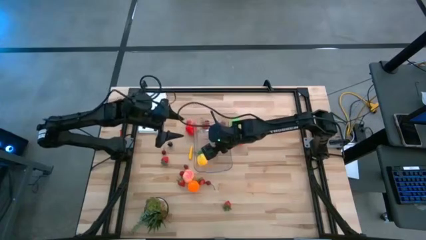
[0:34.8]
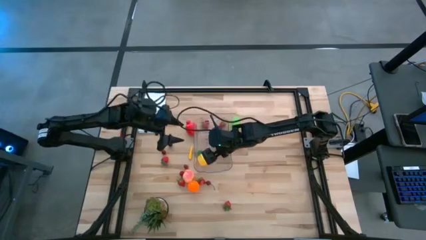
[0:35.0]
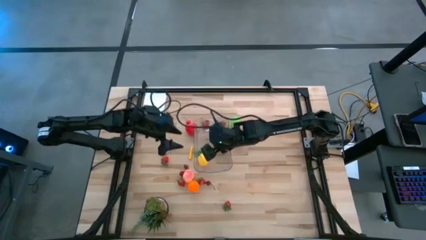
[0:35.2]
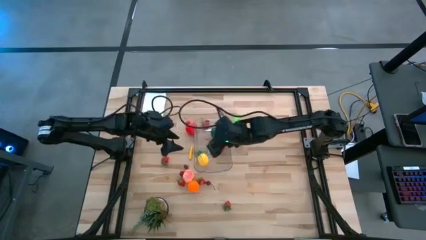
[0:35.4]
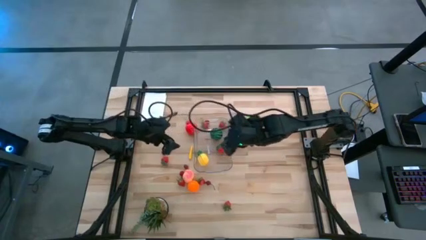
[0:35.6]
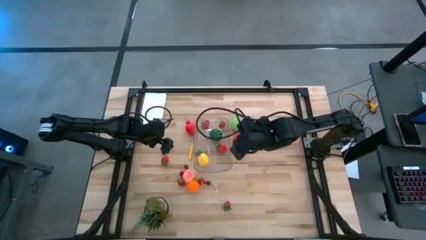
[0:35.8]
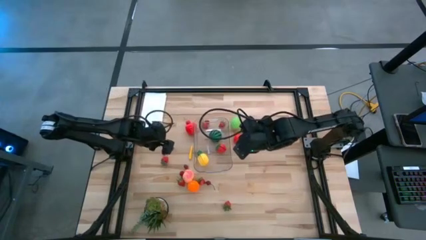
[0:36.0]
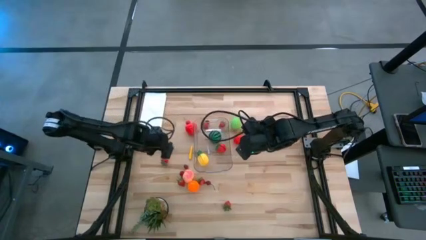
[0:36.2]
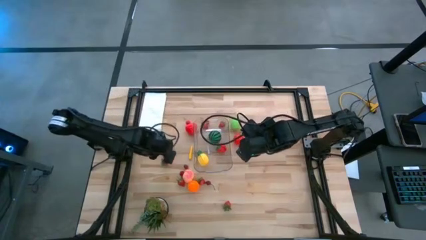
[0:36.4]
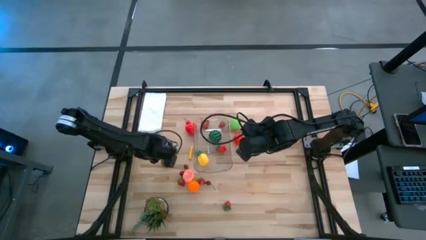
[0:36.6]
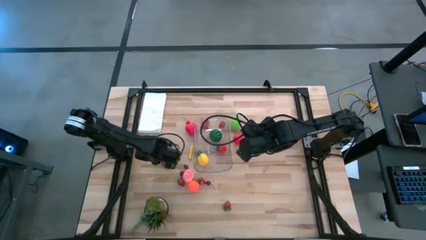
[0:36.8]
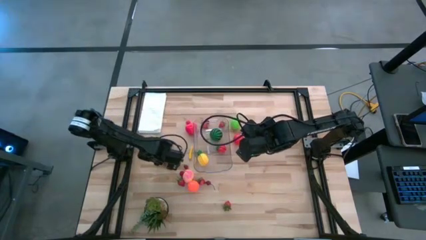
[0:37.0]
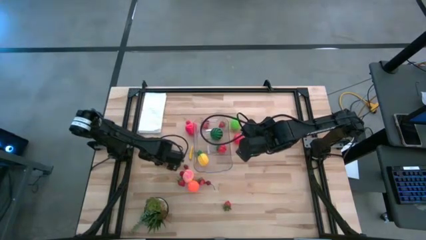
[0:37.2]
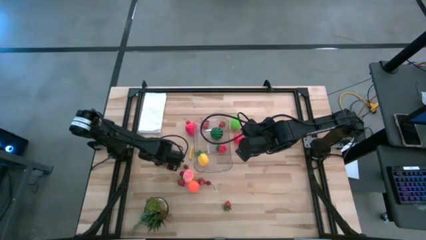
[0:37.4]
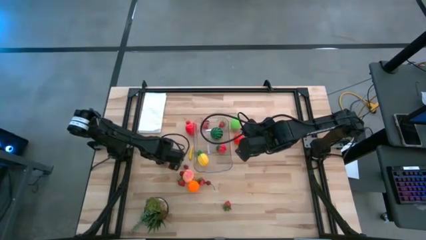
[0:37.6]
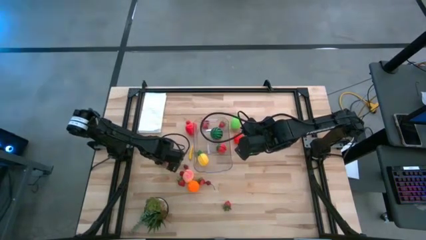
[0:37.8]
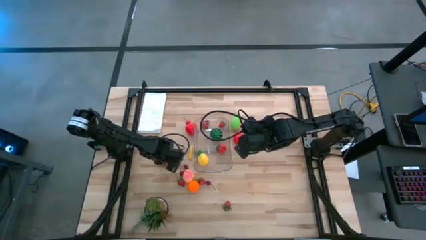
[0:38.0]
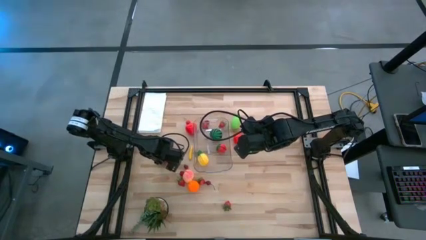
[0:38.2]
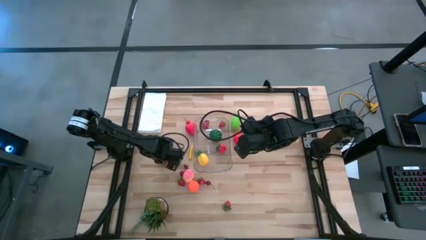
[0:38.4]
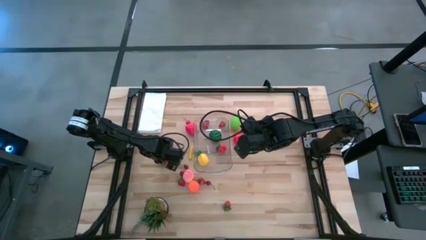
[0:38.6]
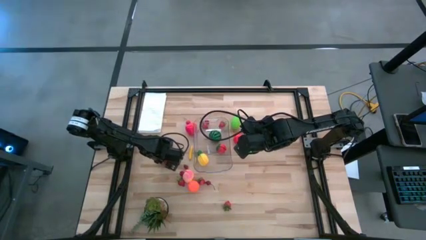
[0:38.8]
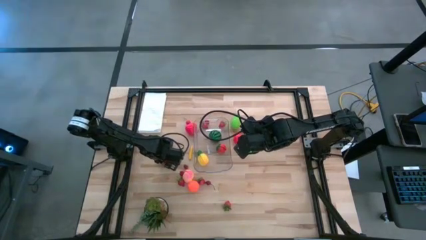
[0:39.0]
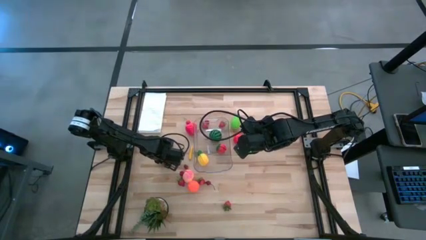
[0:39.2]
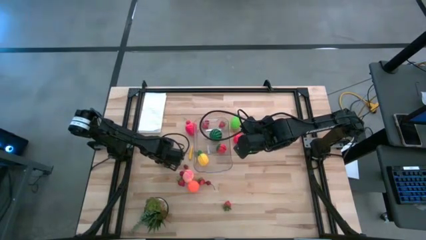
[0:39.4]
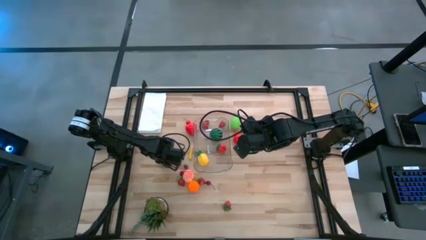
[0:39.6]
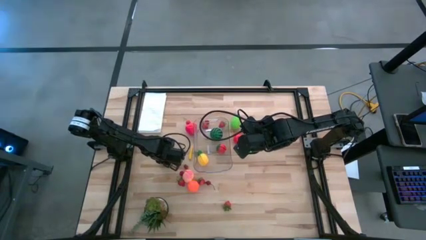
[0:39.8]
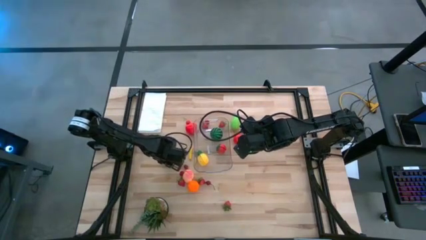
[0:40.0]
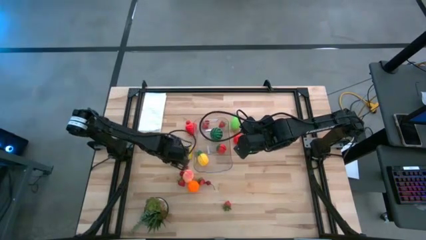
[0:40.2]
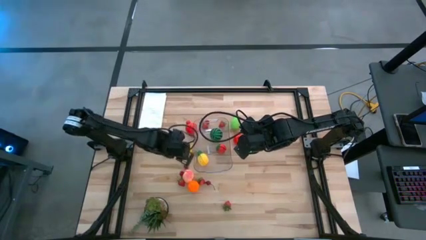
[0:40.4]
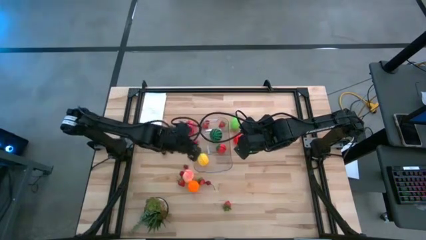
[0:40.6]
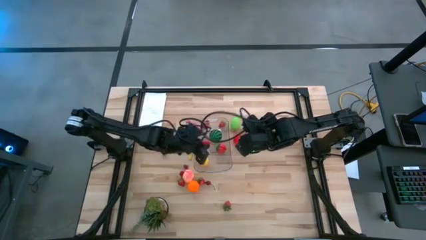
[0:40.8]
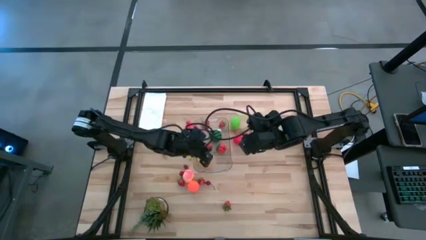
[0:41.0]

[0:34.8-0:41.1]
Task: Pick and placing Produce into tupperware
Put the strawberry into the transparent bin

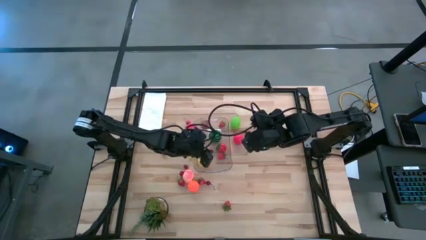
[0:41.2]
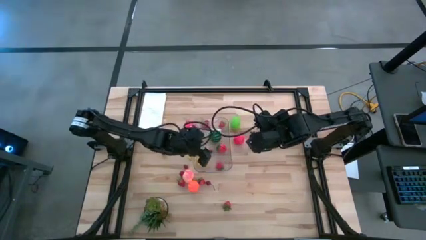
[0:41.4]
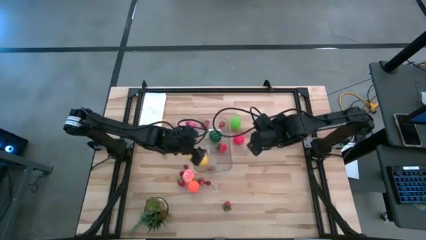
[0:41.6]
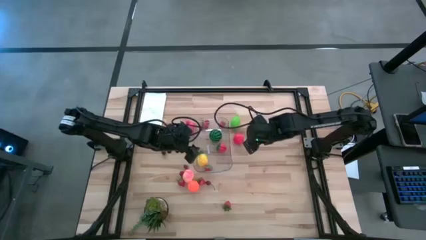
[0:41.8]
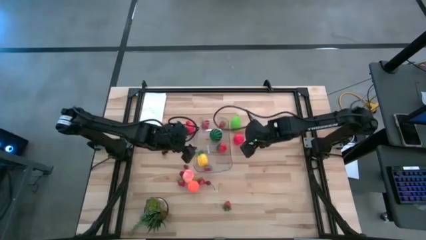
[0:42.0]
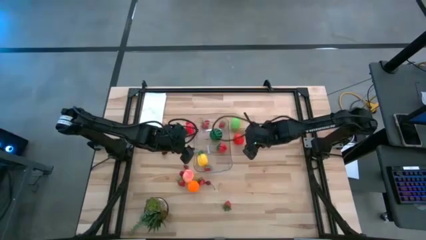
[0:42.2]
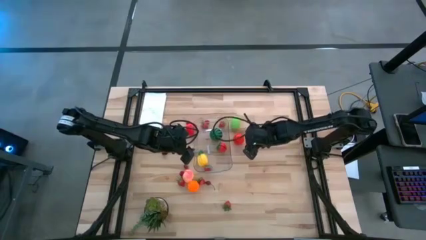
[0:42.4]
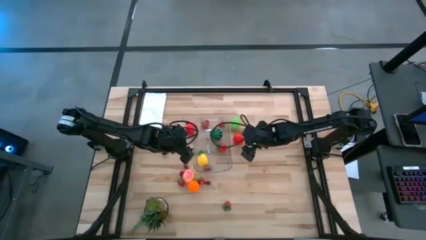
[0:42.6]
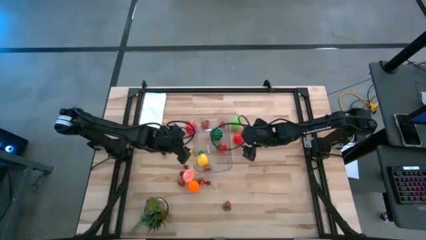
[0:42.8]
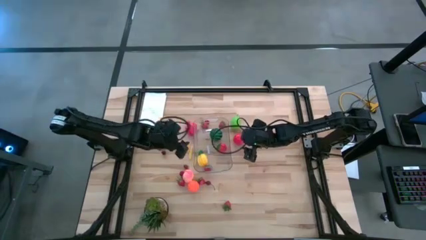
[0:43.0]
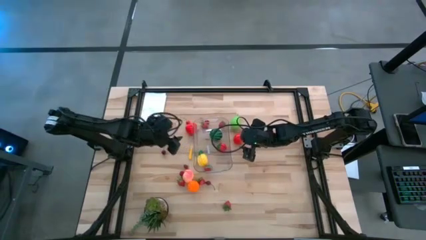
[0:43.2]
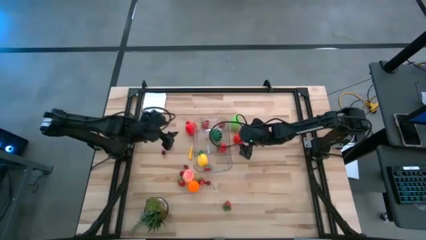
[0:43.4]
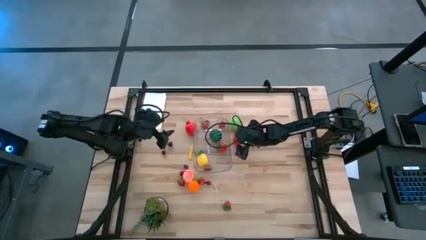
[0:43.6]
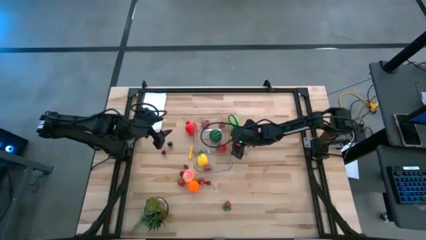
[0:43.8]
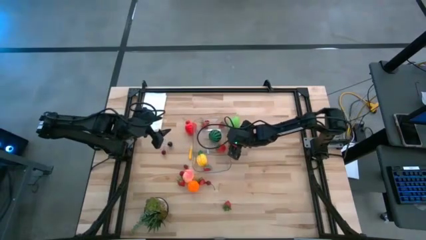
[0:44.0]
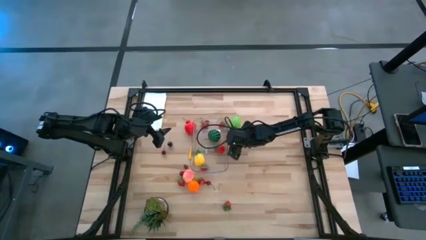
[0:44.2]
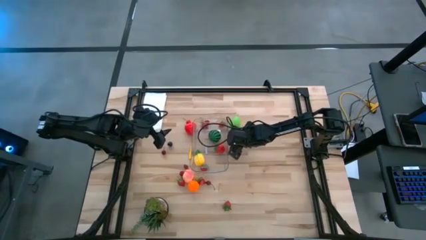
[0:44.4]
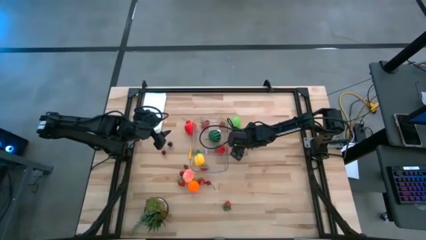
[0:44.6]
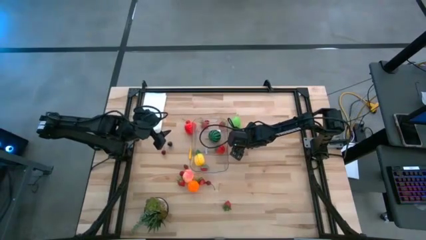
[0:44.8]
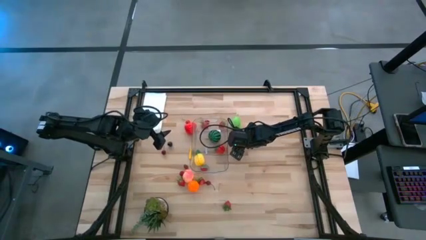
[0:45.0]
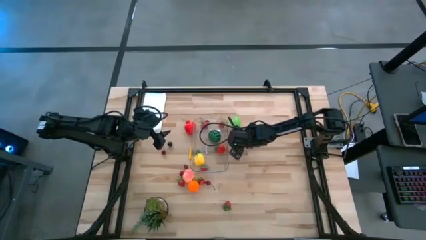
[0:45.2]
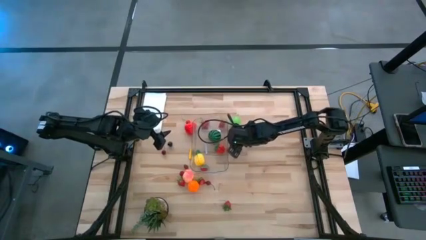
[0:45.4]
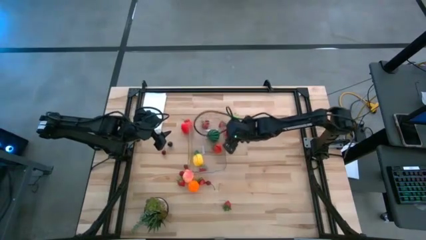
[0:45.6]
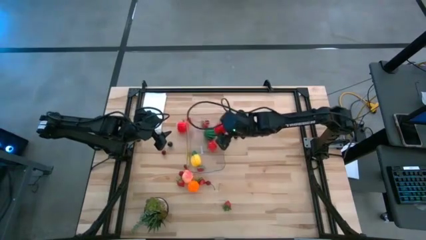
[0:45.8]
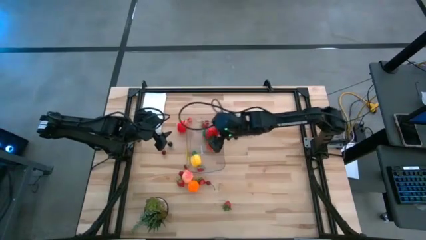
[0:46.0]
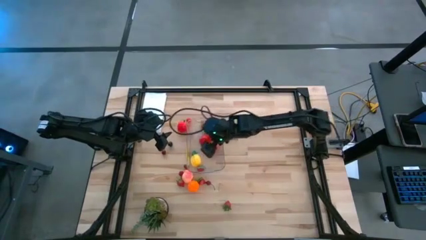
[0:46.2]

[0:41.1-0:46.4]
Put the tomato into the transparent bin

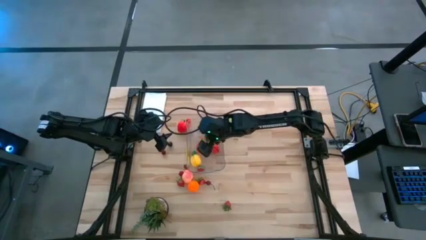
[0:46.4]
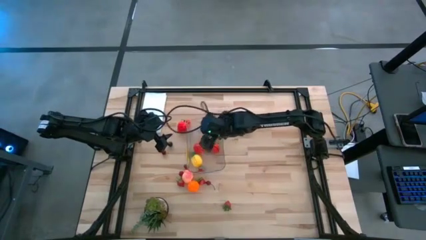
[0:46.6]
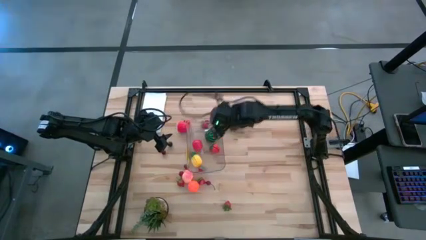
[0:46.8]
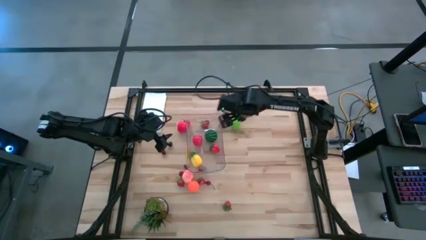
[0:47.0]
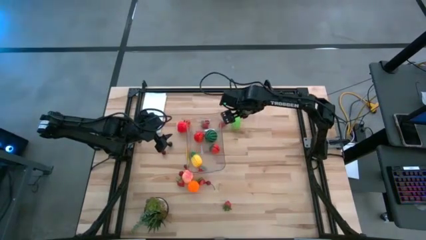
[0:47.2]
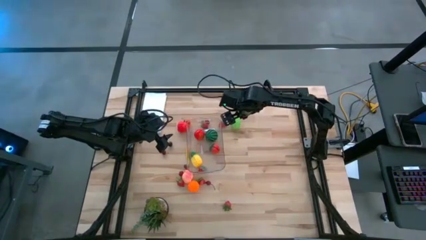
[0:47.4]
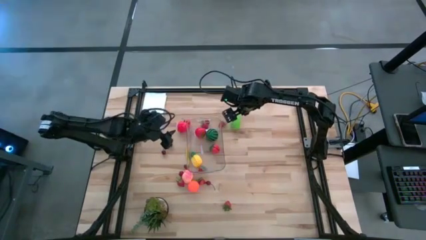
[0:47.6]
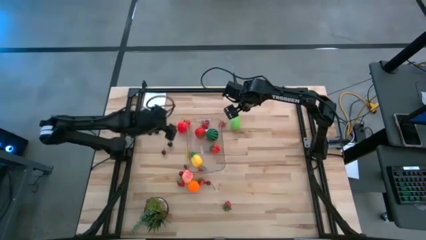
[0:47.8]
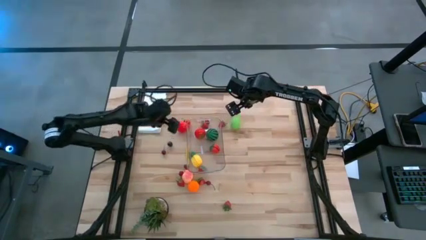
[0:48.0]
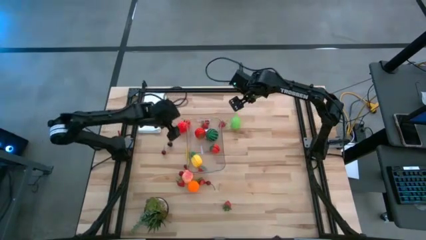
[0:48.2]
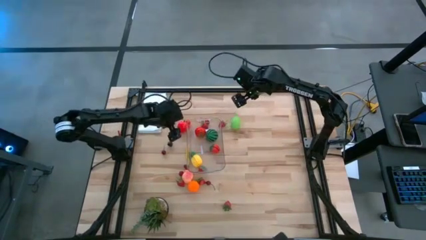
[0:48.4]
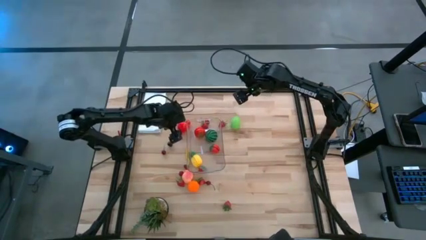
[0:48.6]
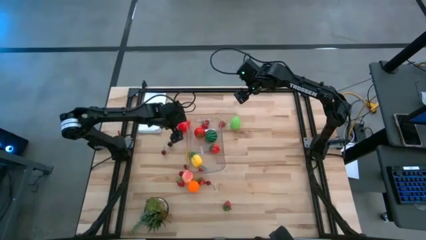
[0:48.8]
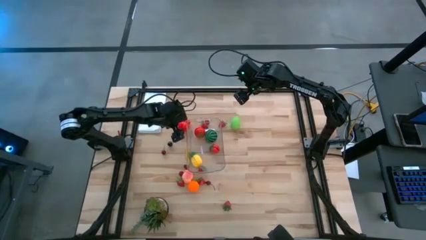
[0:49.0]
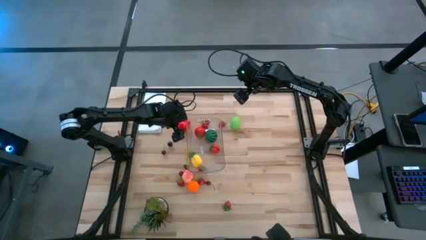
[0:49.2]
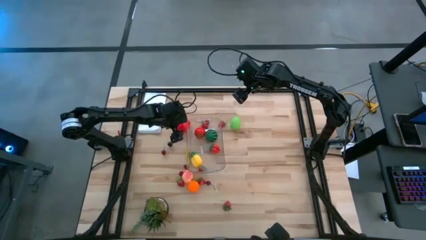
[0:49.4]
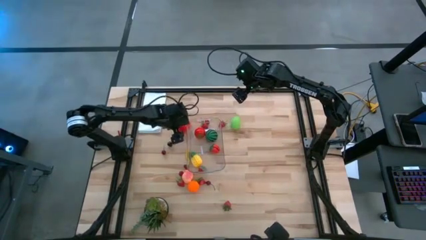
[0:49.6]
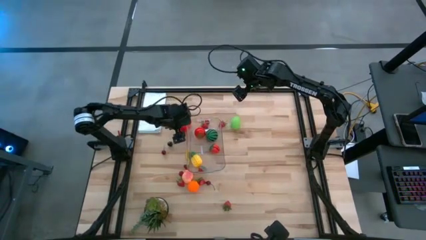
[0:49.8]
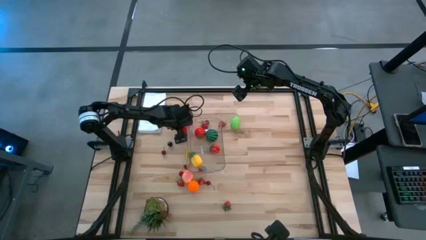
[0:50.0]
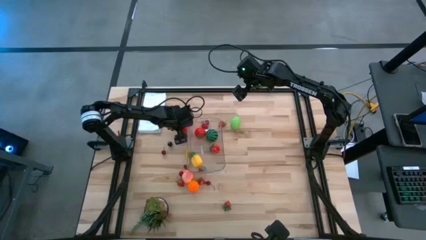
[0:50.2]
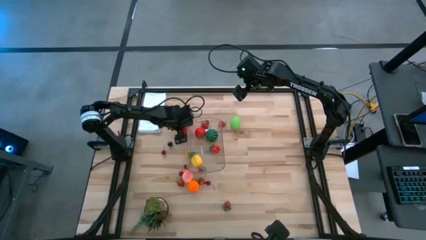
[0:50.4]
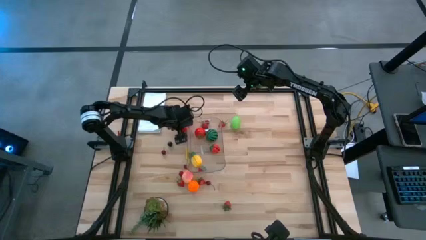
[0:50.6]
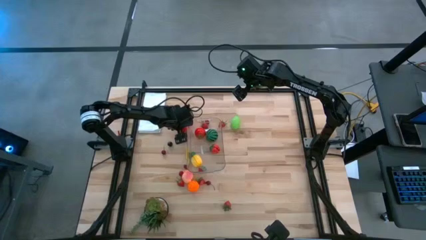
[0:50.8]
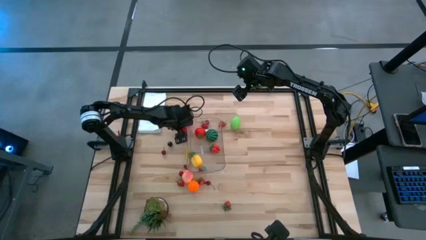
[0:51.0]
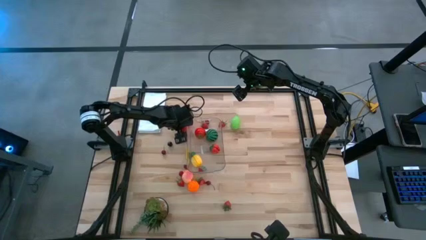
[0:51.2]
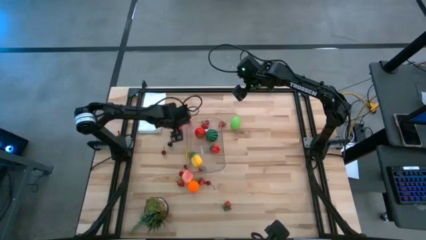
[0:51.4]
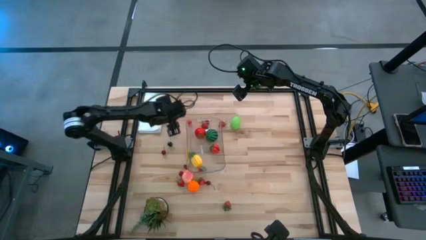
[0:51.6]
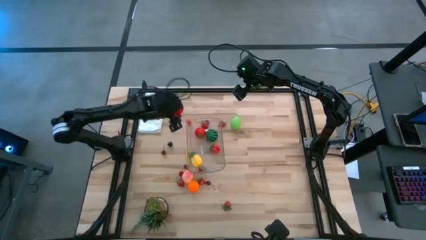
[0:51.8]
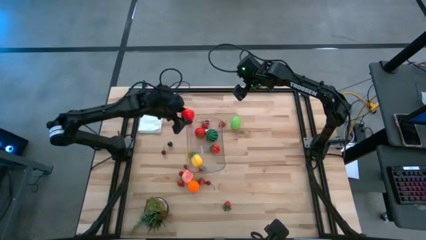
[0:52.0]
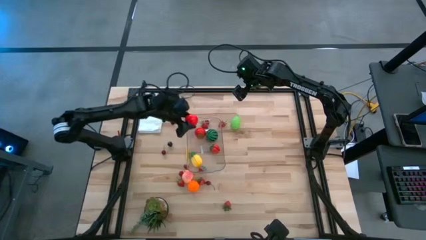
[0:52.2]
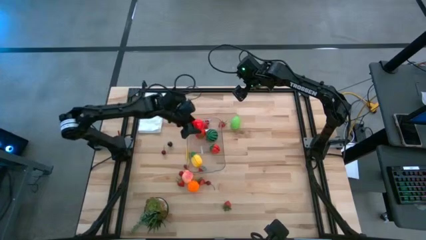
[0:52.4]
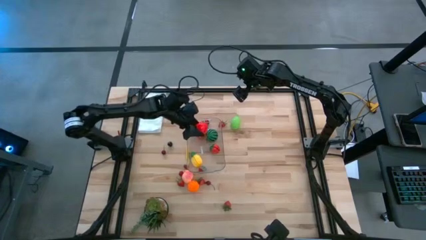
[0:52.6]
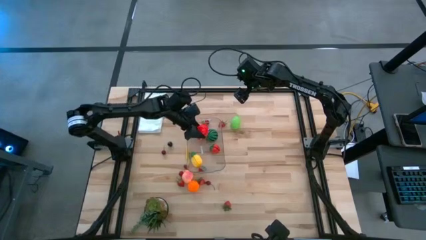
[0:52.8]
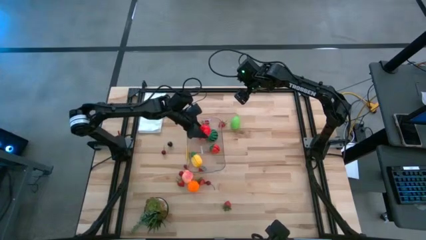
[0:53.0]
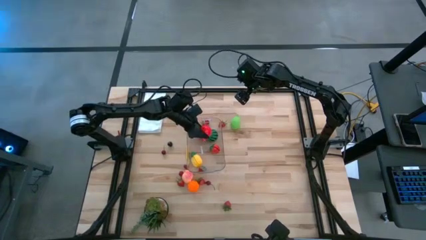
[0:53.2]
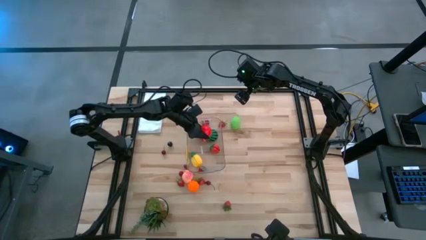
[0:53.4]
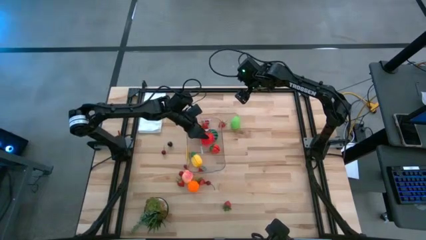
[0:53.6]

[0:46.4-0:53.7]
Put the apple into the transparent bin
